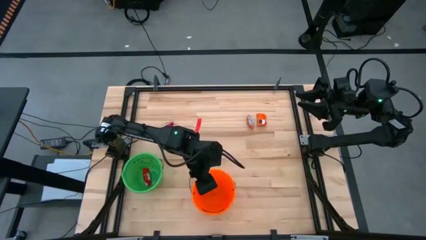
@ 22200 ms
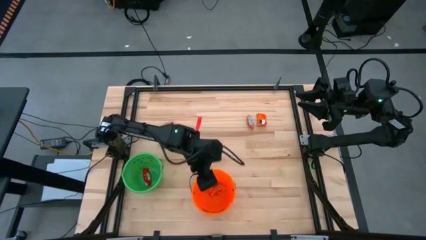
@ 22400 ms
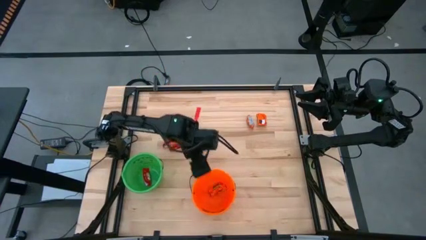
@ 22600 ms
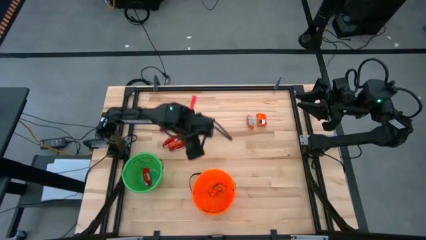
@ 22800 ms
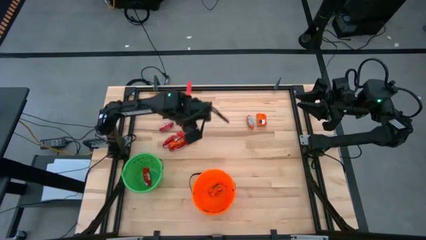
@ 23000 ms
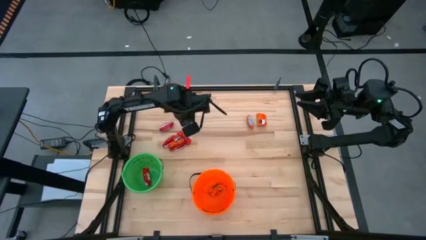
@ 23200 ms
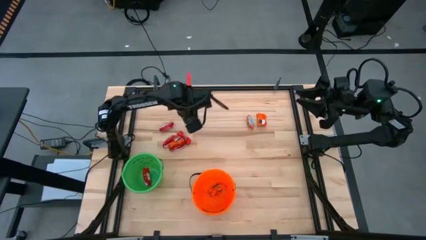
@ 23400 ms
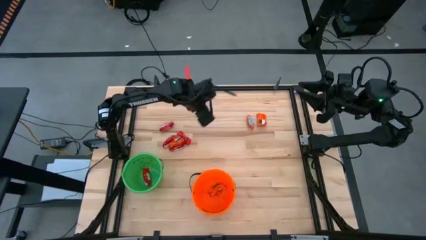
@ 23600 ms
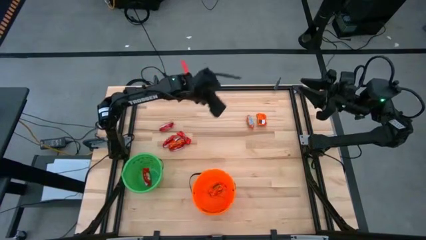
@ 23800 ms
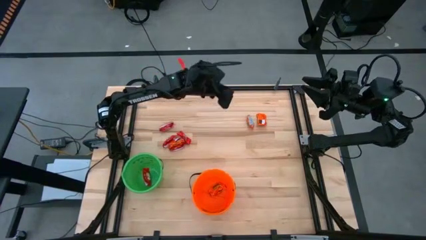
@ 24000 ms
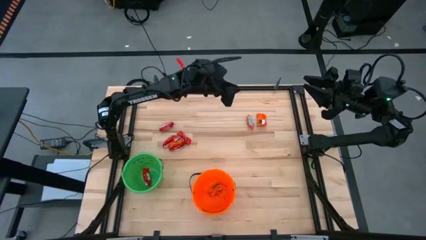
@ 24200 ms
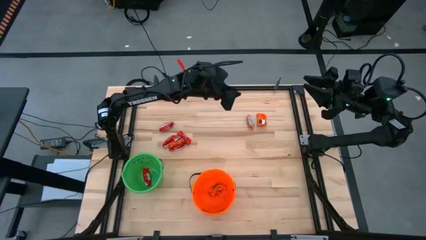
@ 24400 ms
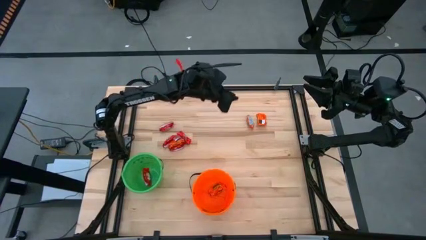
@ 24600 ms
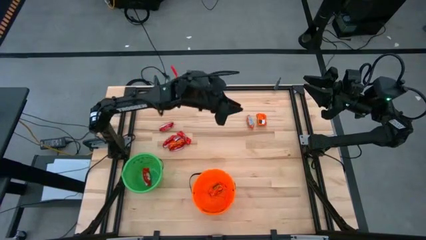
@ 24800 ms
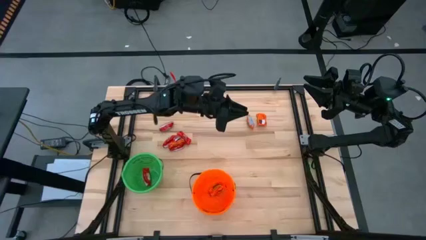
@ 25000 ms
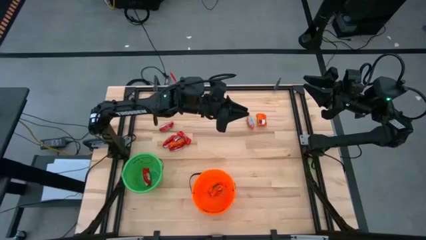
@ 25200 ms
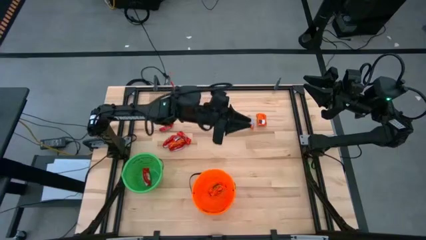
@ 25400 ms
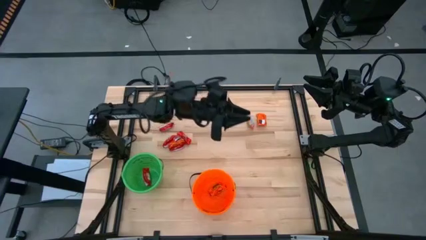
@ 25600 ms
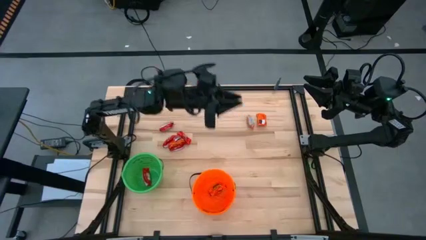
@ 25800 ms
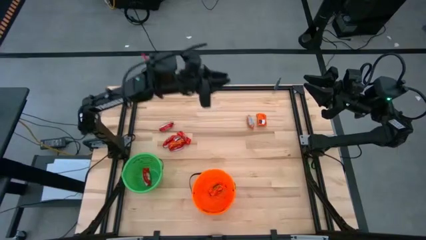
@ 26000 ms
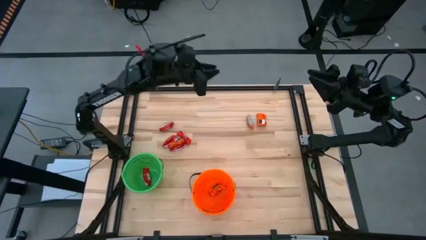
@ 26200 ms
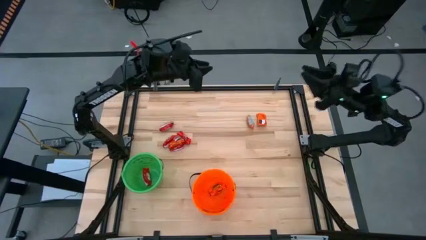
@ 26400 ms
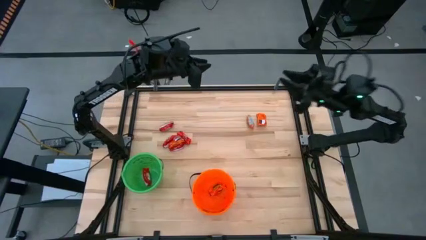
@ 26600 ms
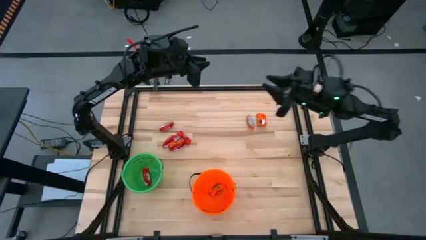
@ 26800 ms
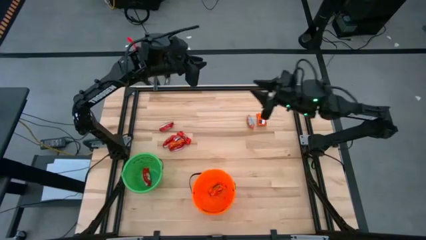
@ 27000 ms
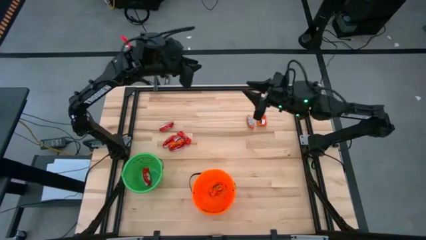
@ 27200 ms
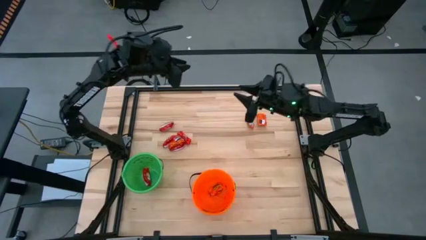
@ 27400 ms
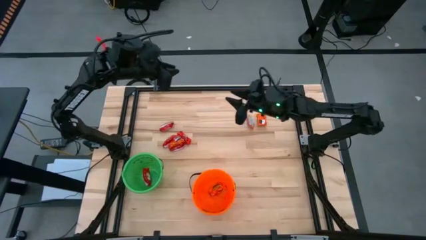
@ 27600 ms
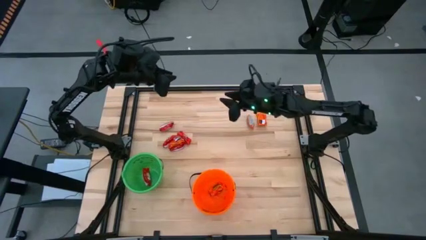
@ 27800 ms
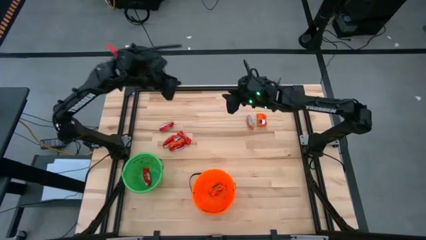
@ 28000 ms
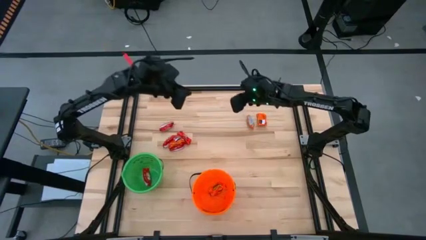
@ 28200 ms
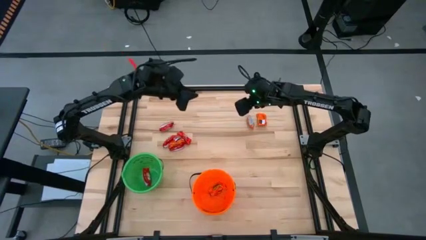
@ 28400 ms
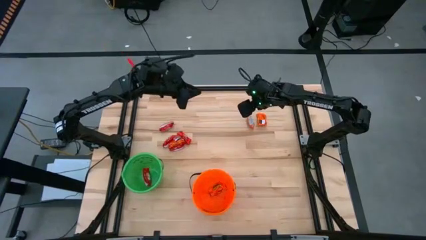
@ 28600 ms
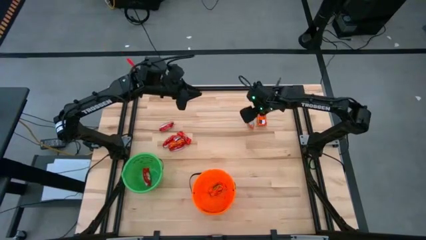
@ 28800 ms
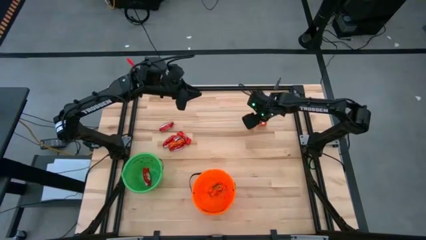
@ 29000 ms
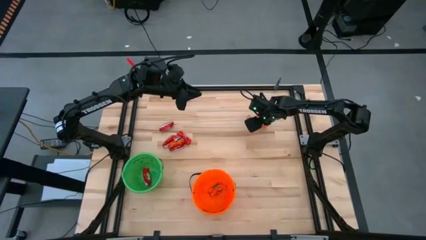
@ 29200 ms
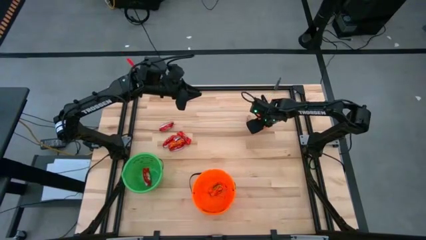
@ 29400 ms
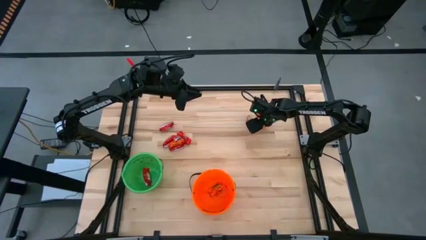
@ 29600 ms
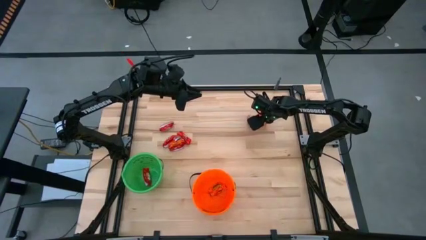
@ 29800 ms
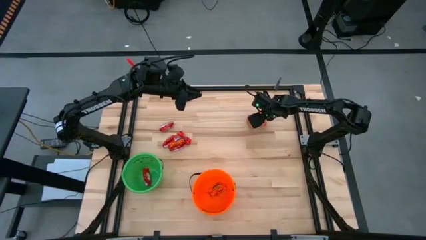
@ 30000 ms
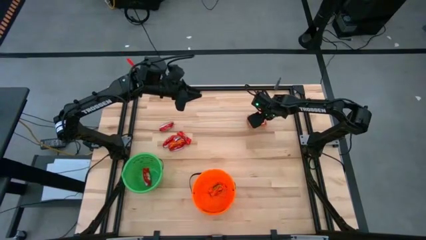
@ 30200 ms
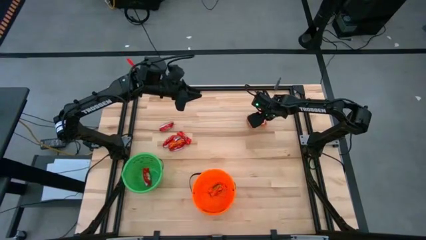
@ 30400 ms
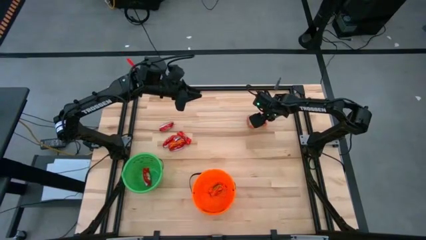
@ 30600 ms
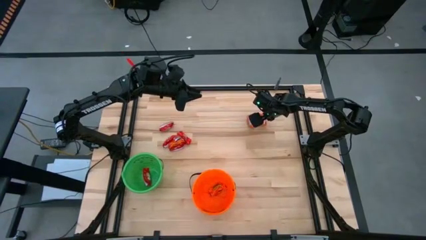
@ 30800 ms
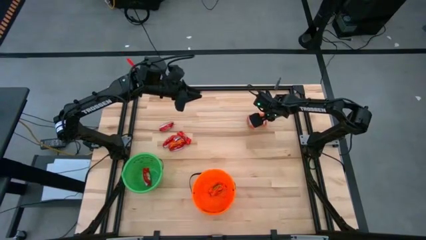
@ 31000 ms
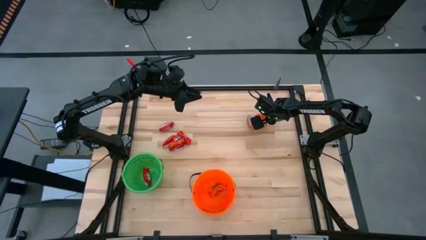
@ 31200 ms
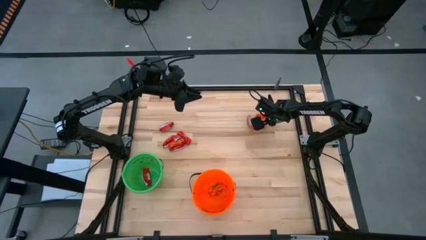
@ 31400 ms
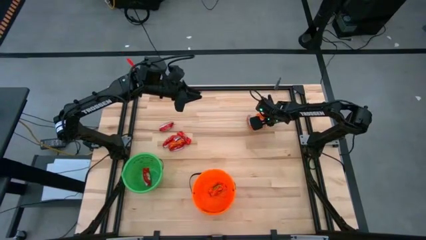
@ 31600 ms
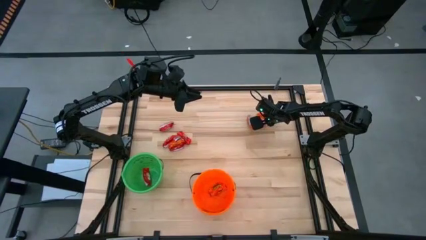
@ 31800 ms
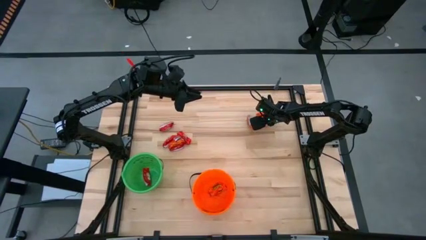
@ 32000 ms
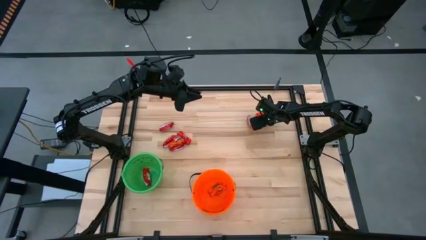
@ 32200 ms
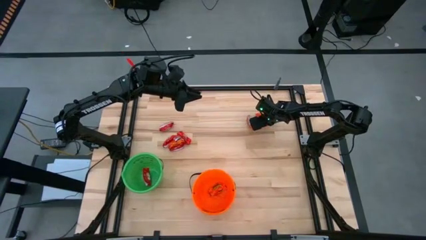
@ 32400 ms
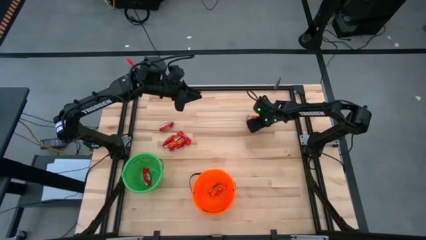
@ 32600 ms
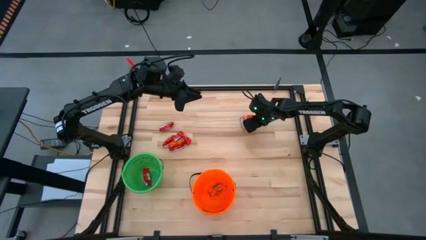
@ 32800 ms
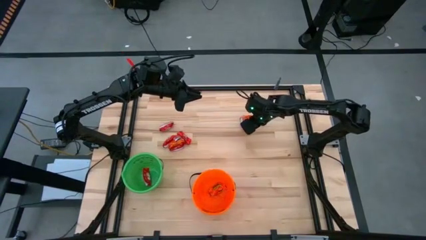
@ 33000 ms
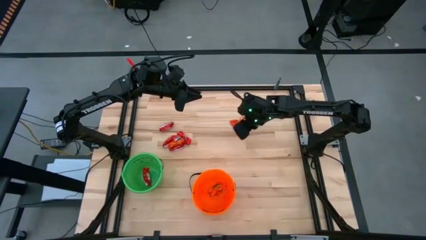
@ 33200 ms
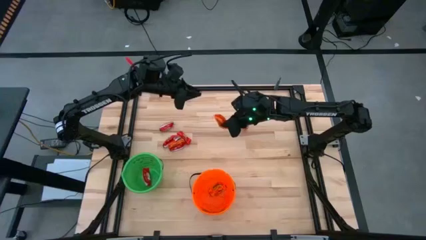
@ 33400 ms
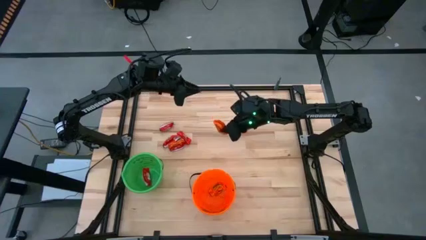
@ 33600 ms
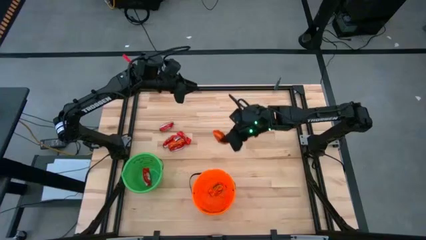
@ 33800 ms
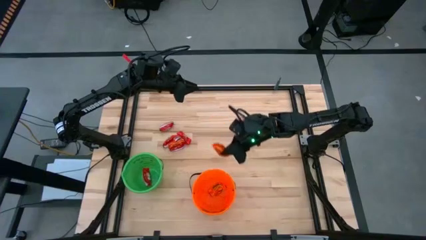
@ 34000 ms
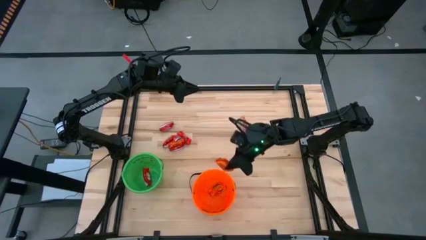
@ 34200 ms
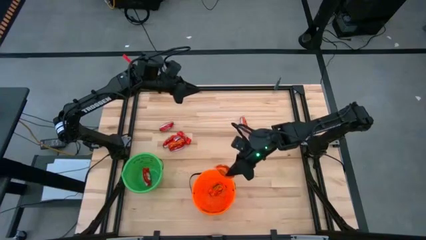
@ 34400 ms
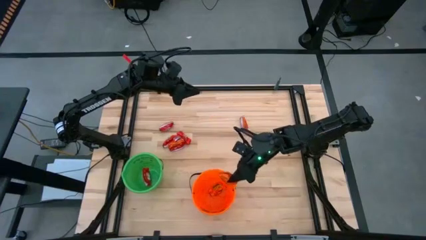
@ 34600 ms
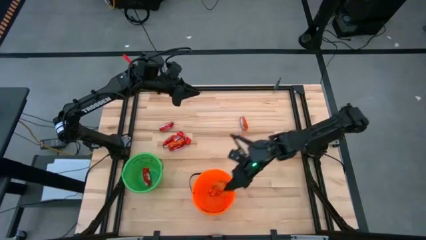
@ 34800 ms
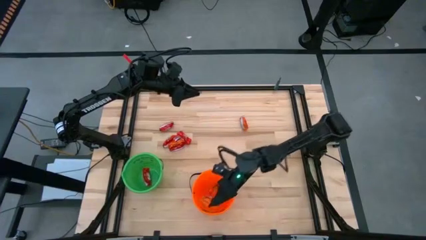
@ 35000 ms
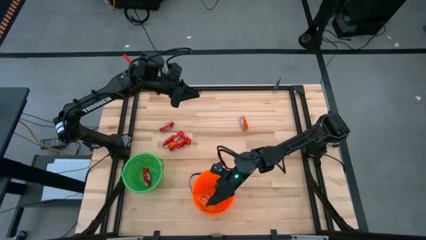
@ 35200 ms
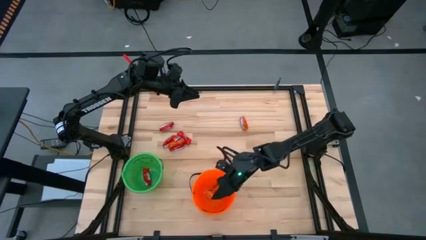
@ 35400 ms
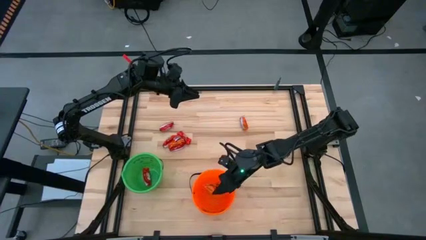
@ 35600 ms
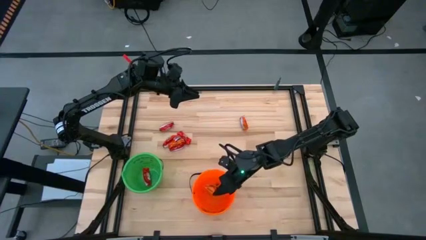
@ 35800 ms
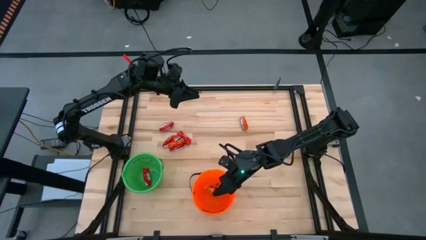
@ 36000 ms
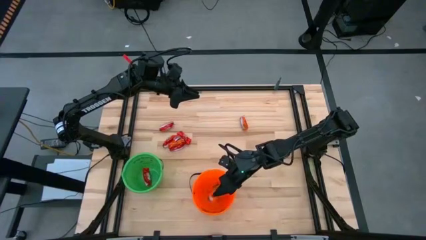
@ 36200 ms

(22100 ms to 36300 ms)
Put the orange chocolate into the orange bucket
